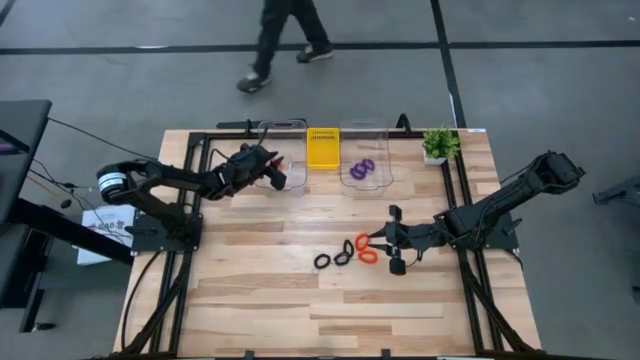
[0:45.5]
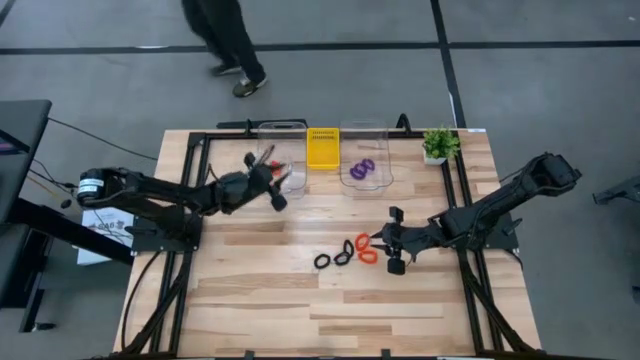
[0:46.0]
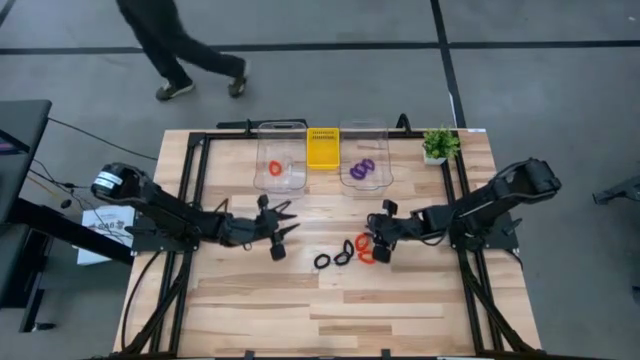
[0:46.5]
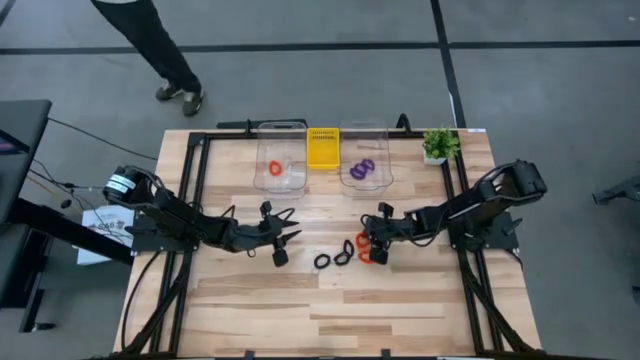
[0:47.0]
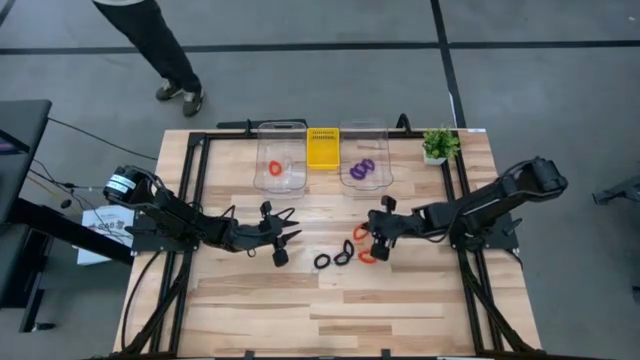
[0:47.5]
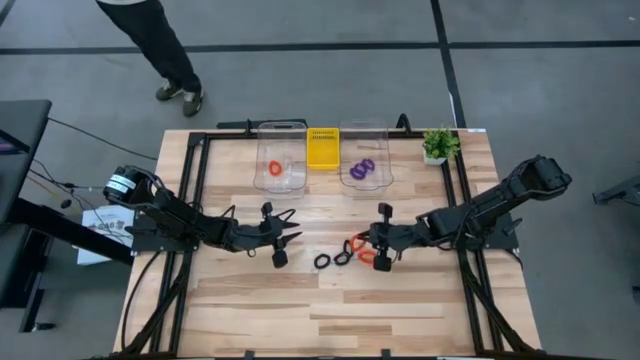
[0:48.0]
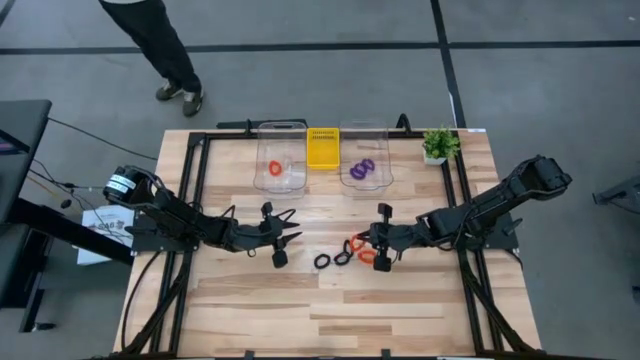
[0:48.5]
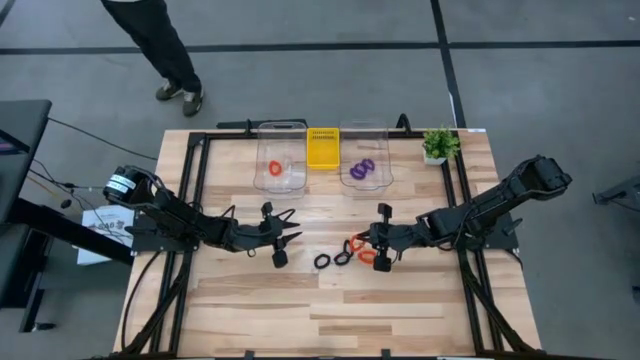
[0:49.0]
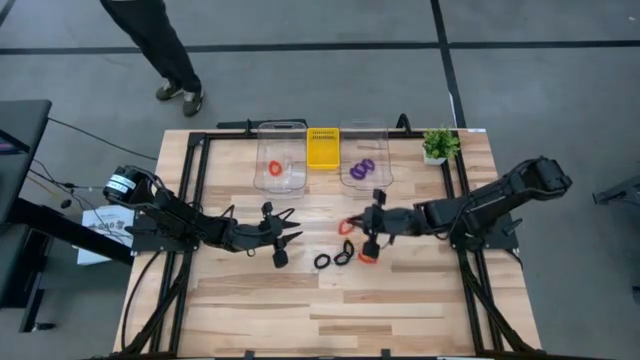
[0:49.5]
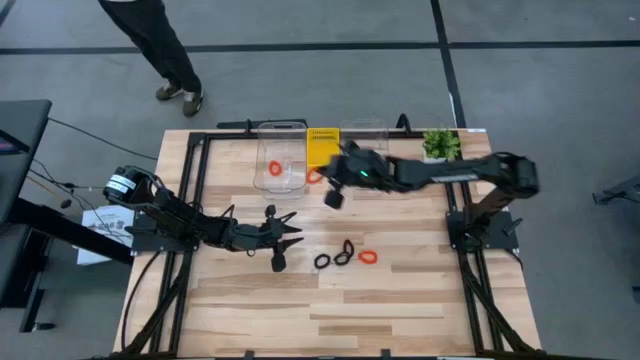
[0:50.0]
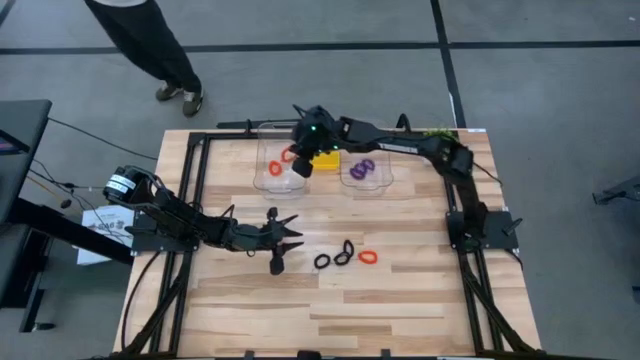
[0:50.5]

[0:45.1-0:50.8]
Task: Sort spring keychains
Put the top orange spring keychain into the left transparent bin

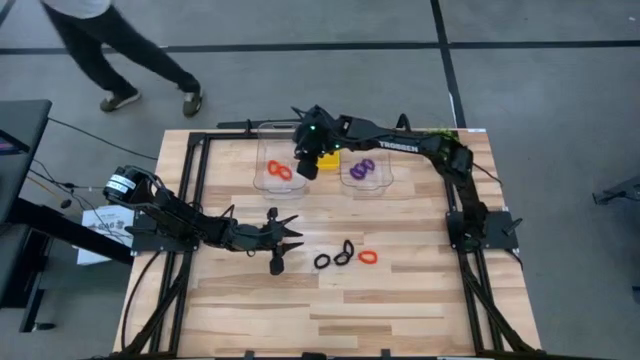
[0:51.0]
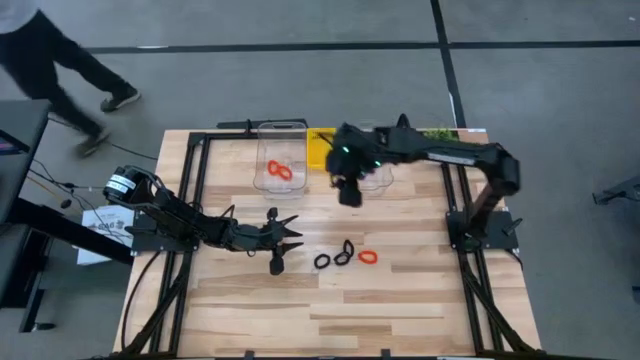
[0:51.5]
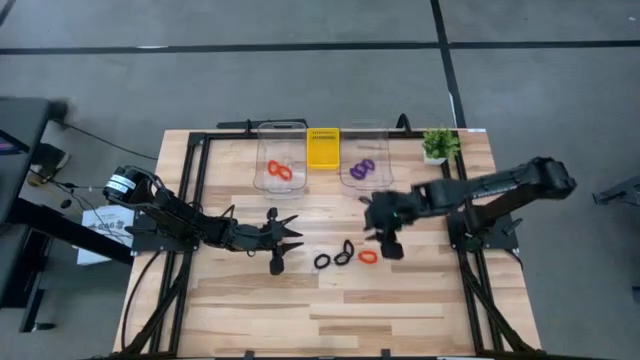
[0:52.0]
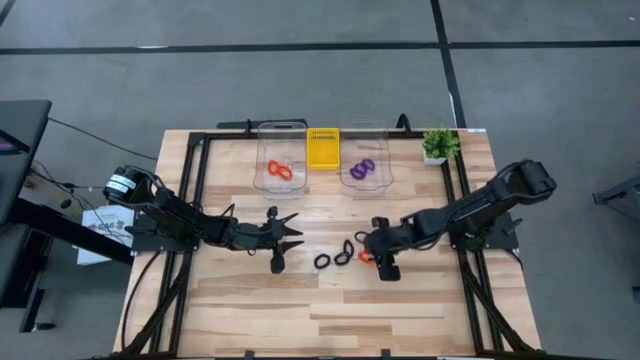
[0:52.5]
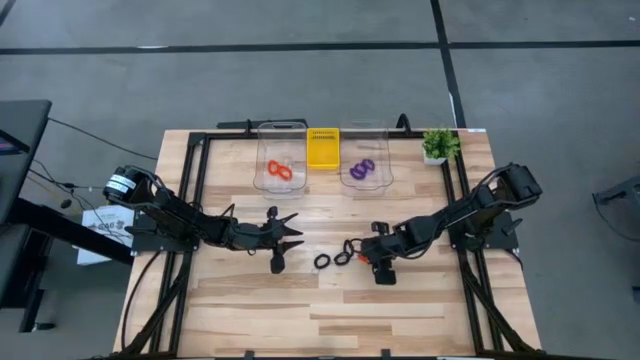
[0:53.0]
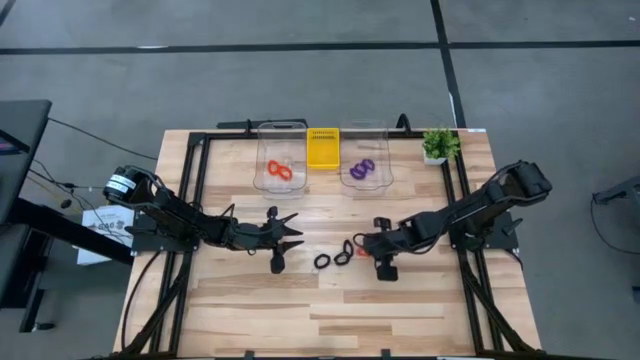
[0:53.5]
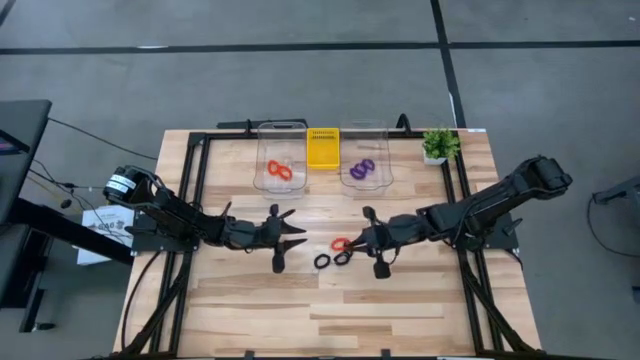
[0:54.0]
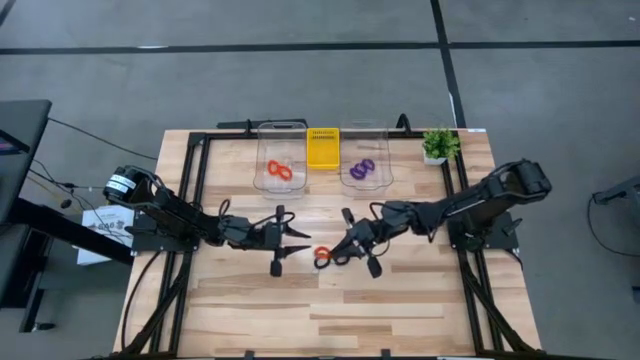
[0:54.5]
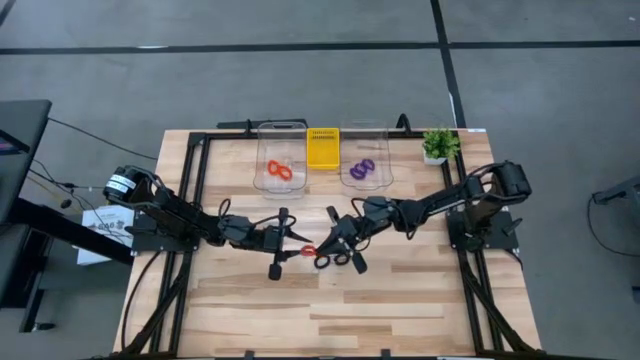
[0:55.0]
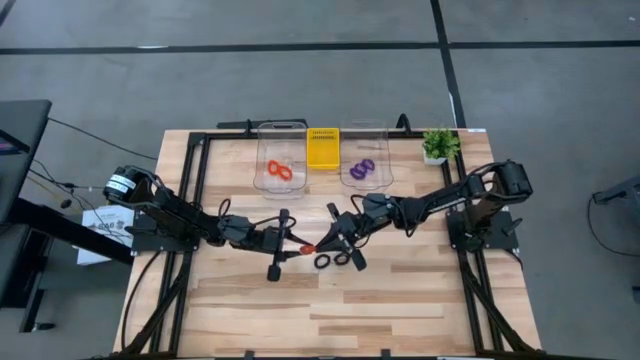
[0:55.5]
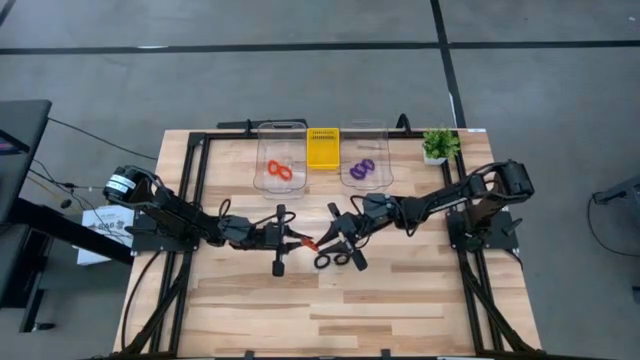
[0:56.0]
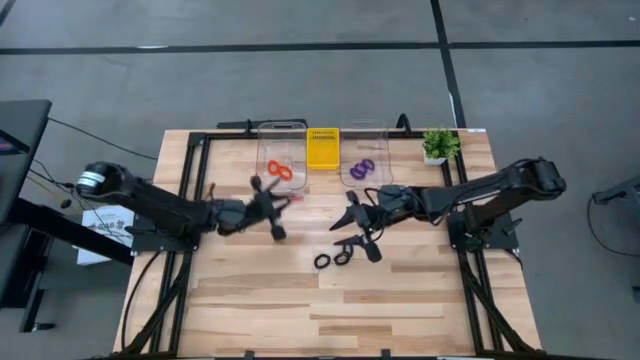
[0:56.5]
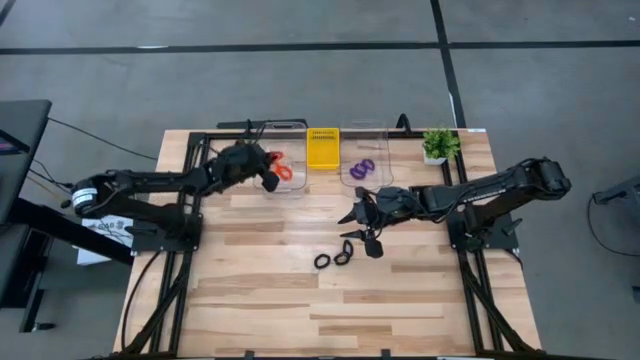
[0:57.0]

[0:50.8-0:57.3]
Put the orange spring keychain into the left transparent bin

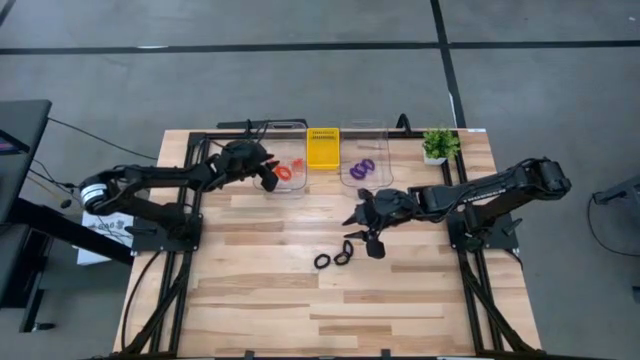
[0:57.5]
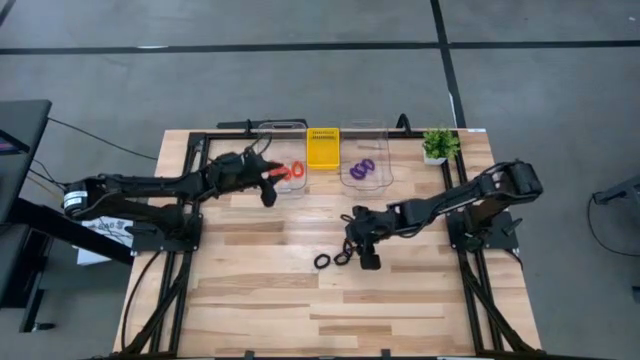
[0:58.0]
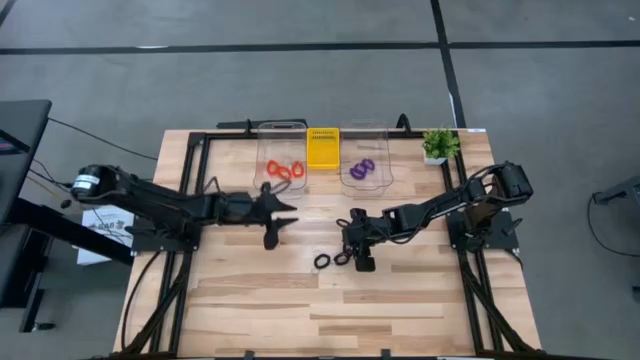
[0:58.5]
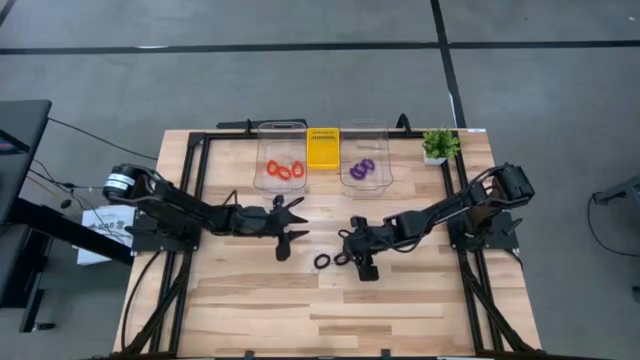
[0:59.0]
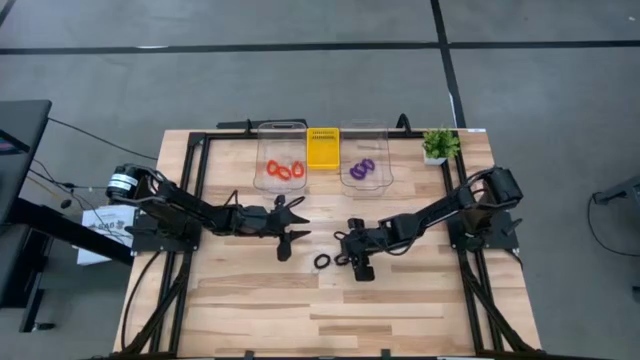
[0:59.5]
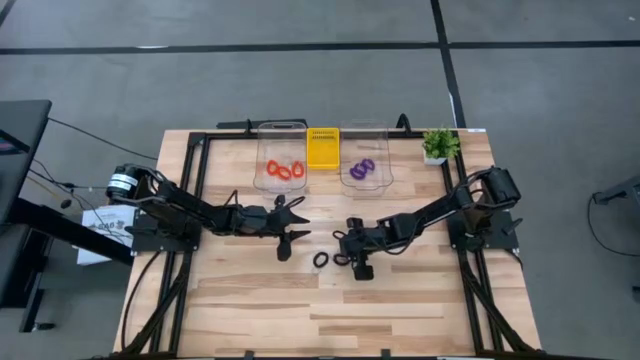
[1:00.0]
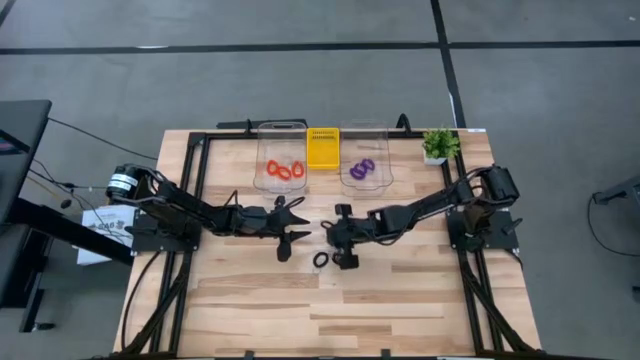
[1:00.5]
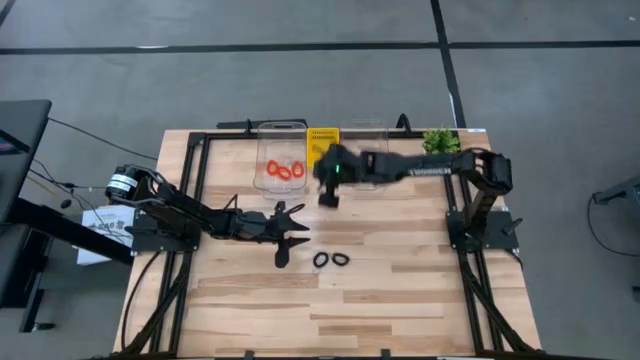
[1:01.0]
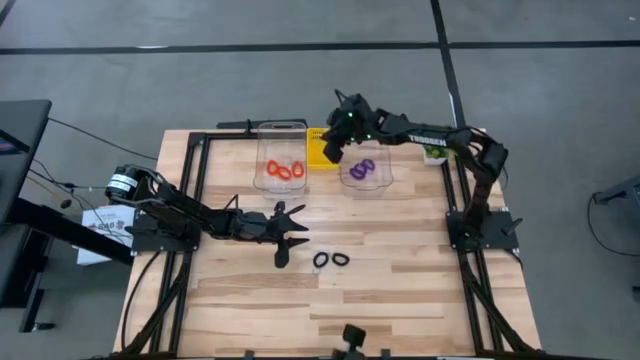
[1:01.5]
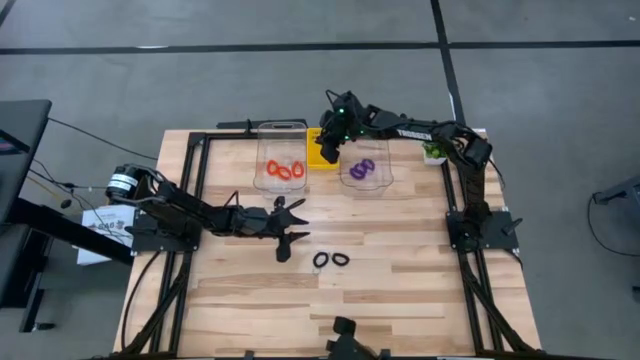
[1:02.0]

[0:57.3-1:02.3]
Put the top black spring keychain into the yellow bin

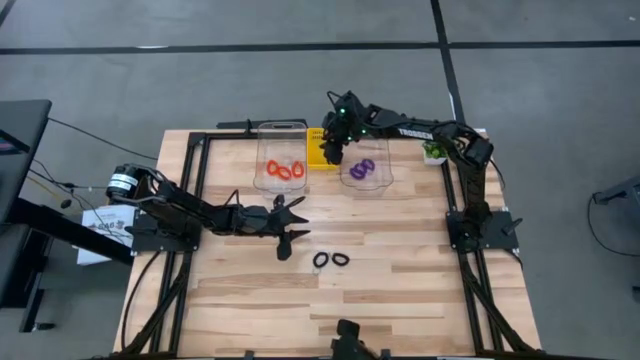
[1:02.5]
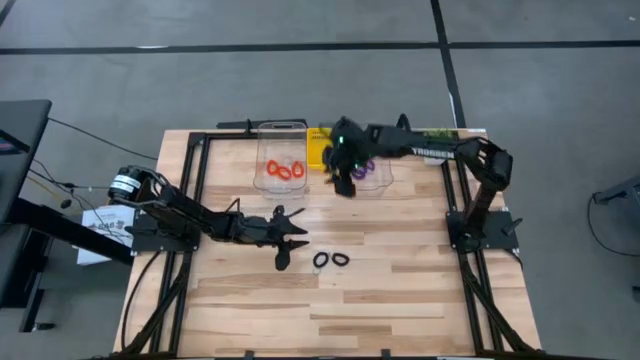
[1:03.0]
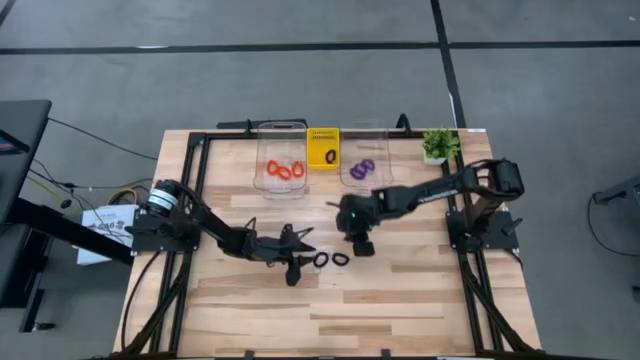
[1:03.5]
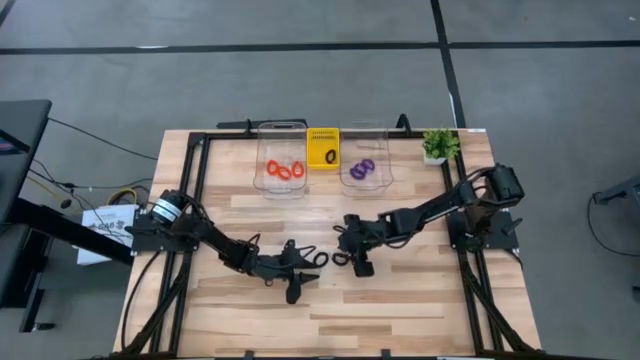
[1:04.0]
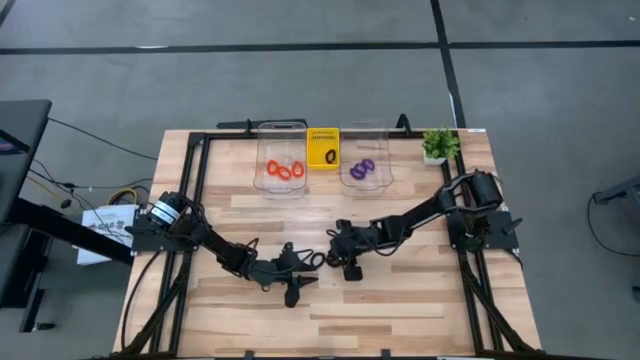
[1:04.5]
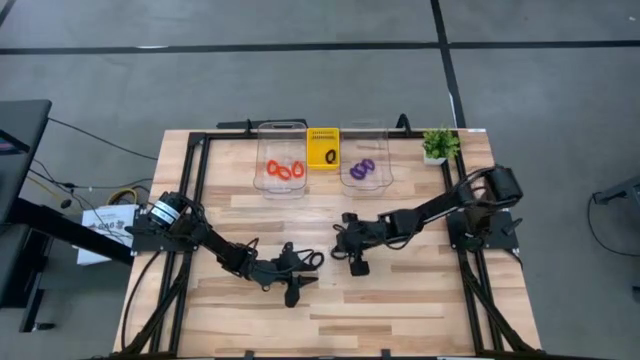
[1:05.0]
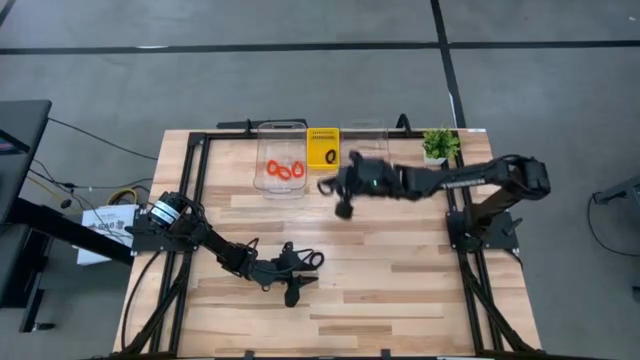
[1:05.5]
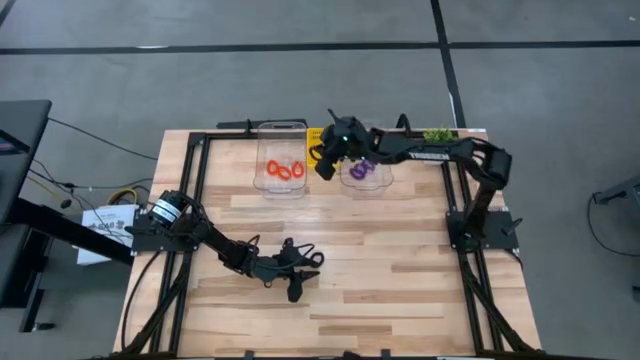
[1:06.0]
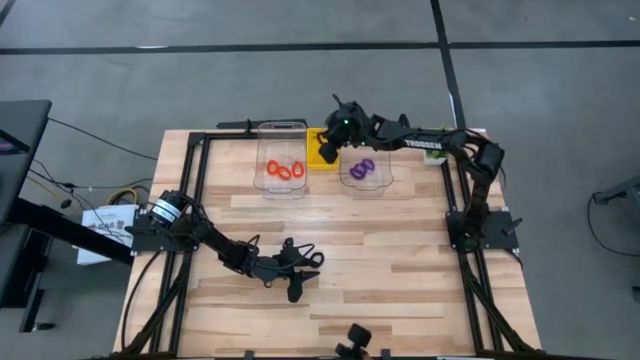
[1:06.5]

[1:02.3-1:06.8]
Put the right black spring keychain into the yellow bin
